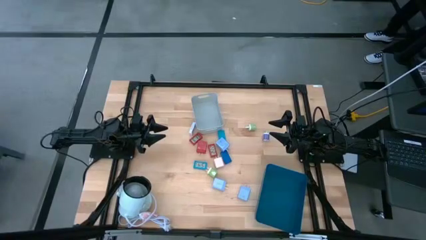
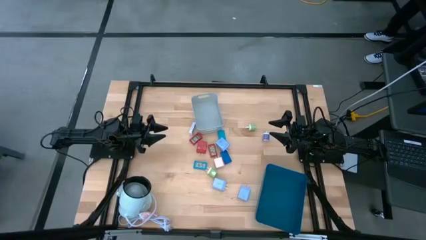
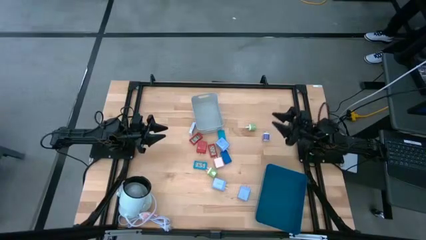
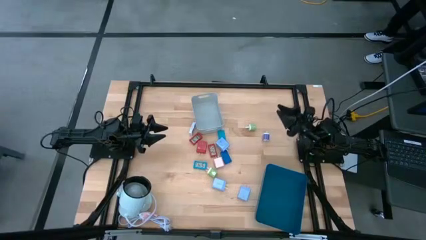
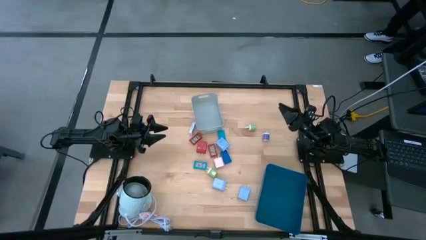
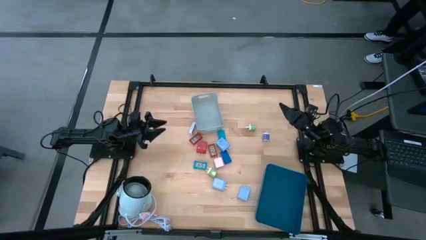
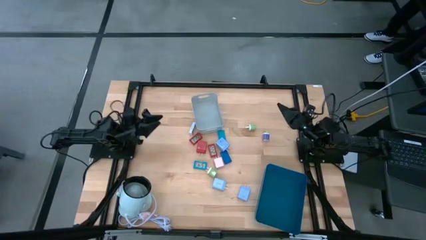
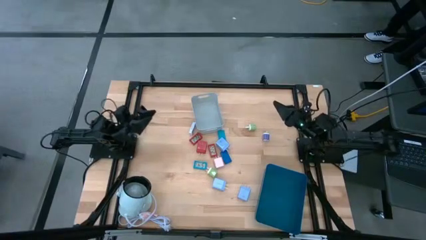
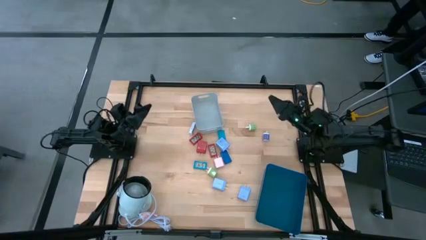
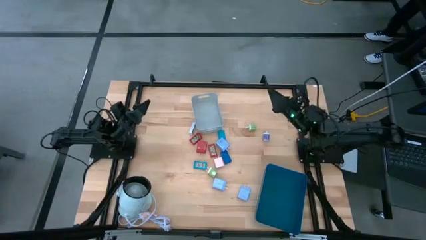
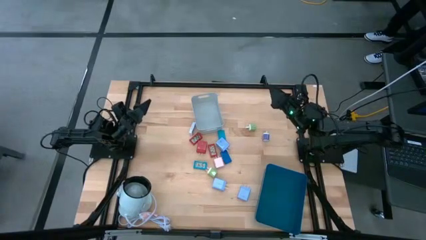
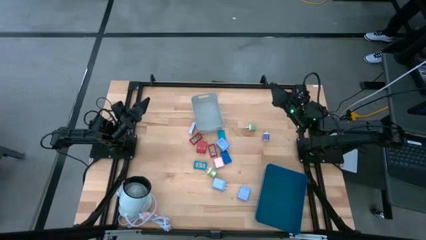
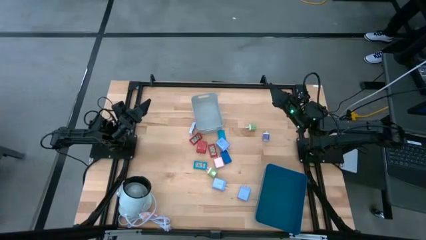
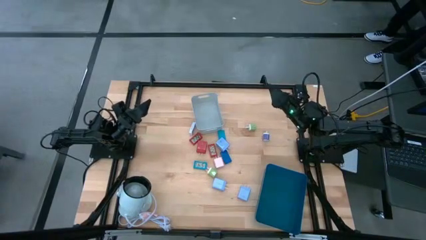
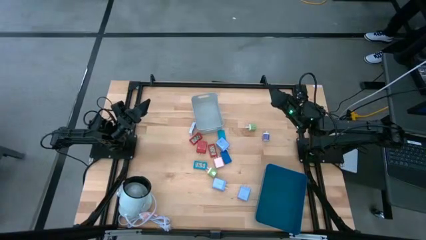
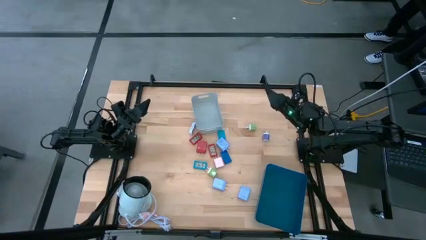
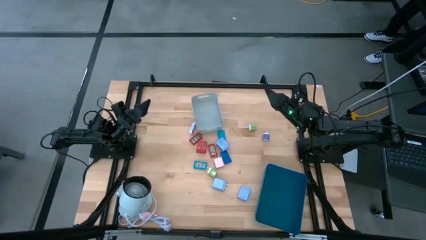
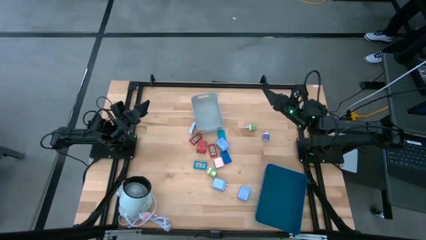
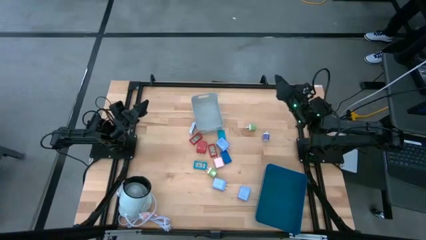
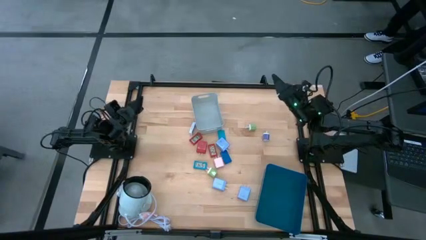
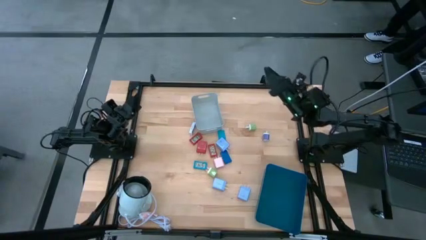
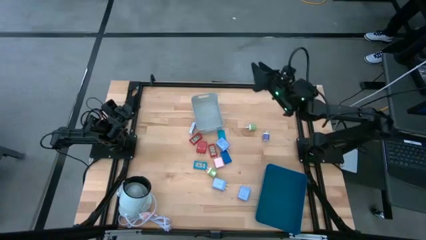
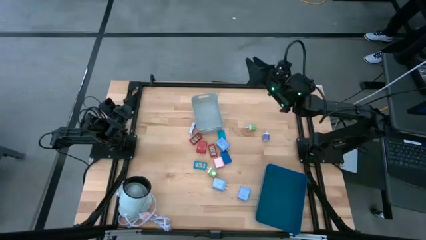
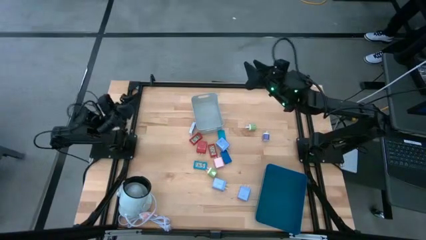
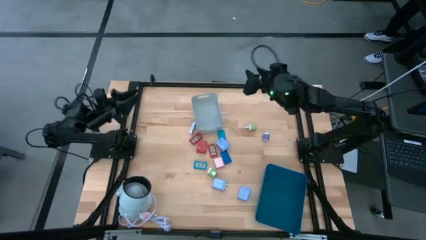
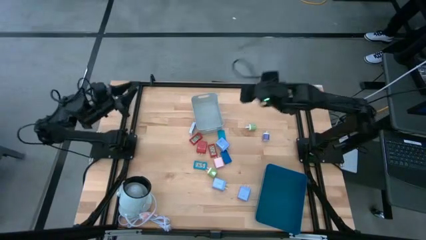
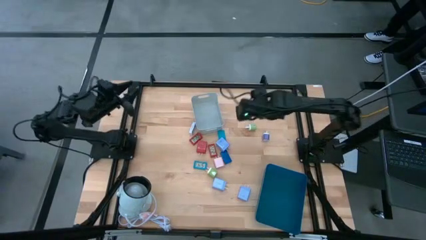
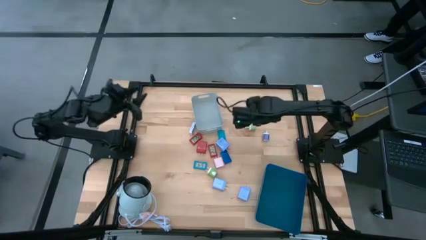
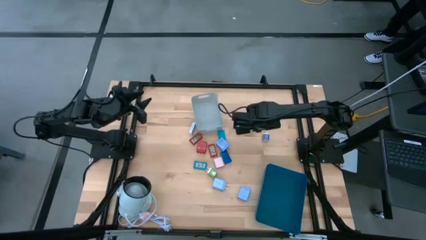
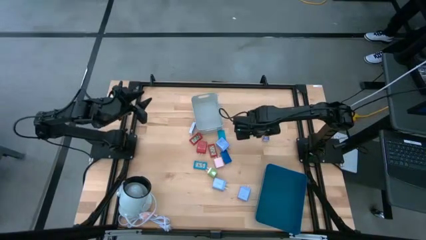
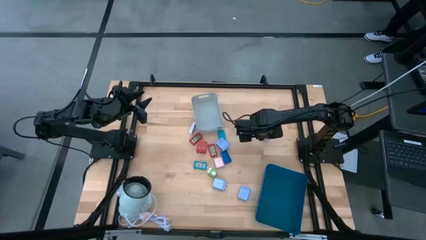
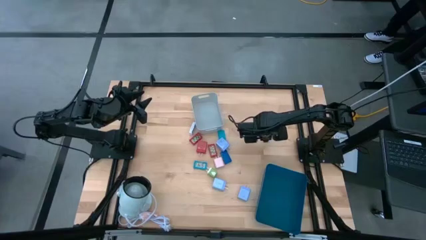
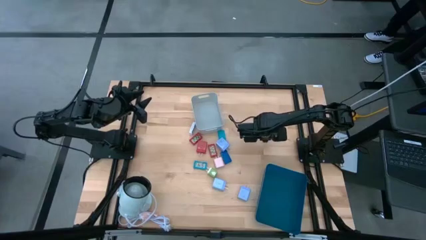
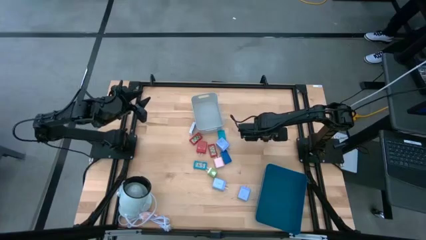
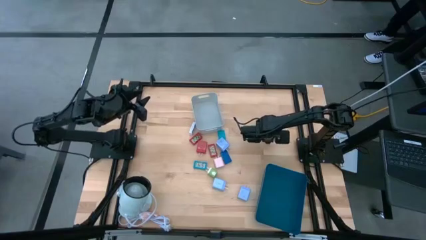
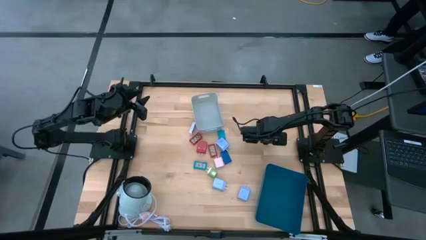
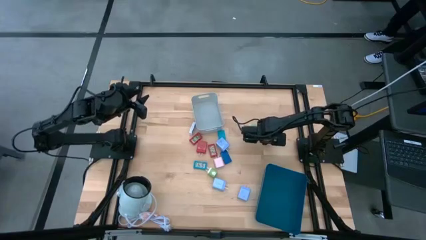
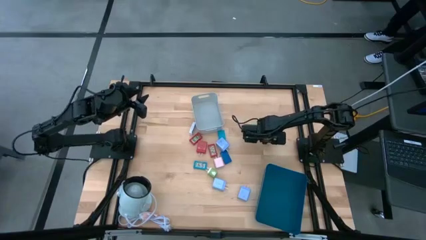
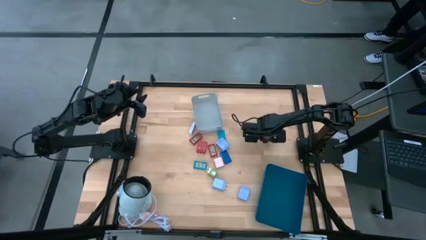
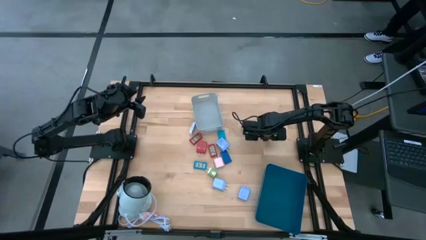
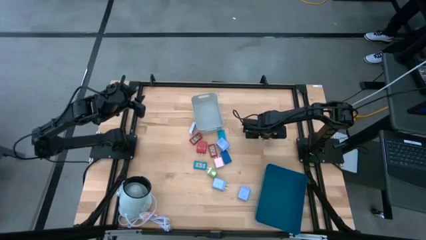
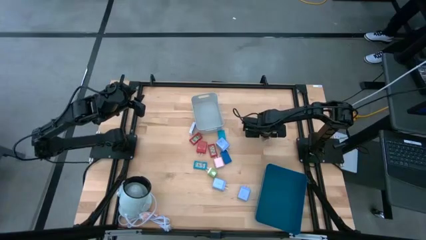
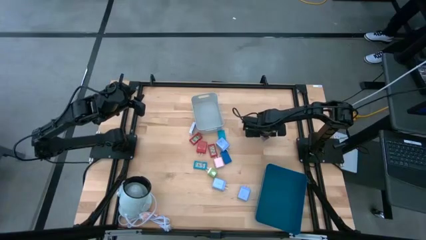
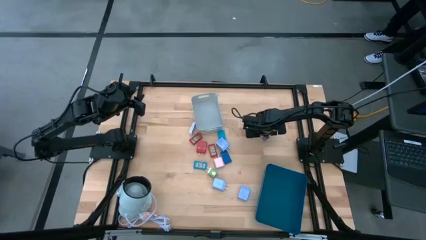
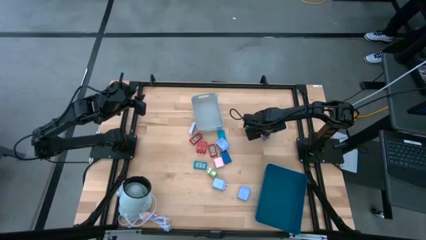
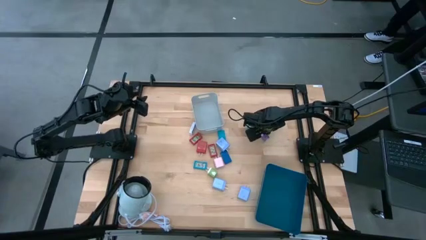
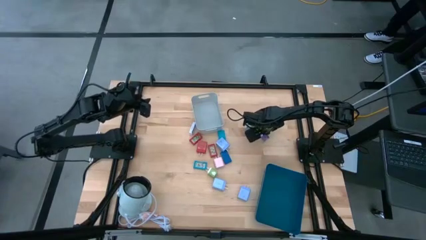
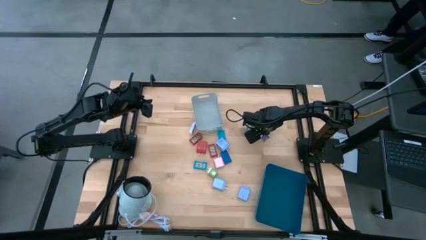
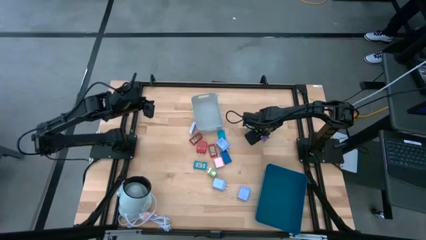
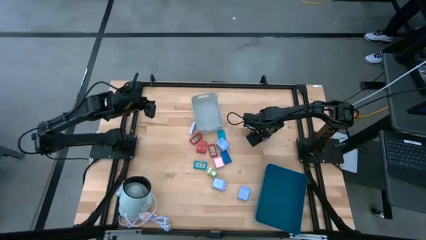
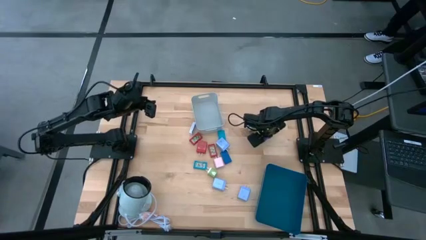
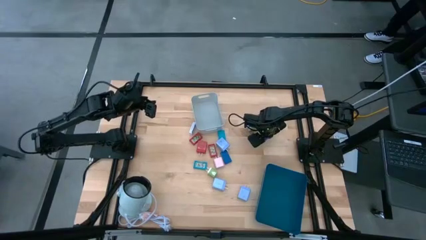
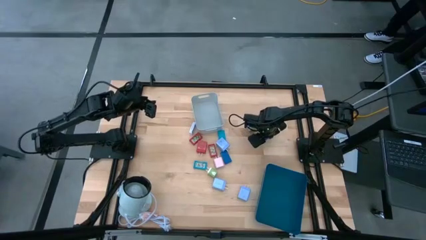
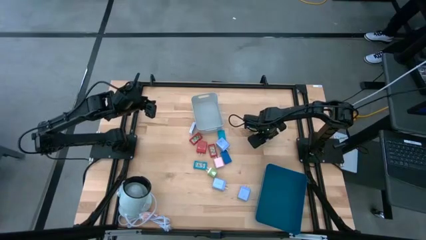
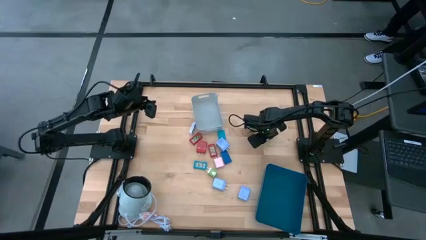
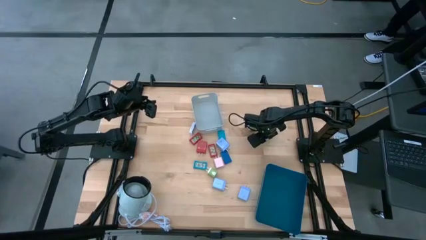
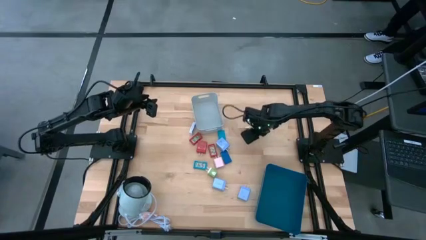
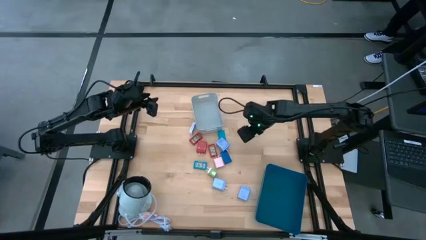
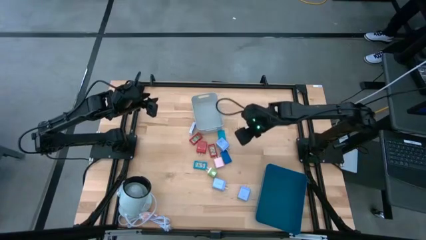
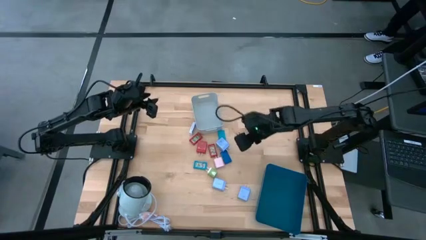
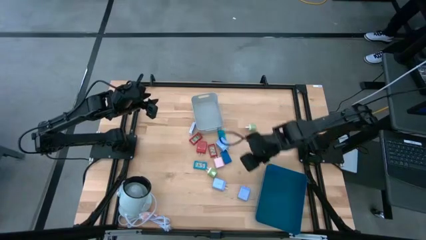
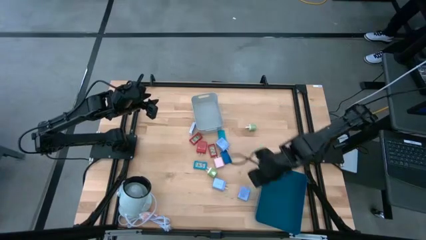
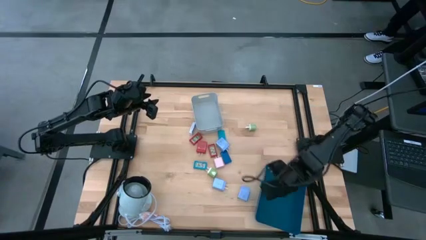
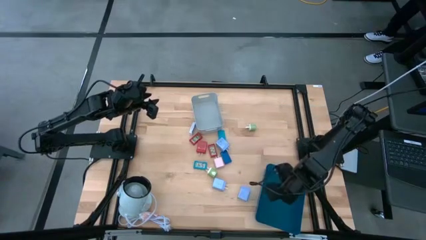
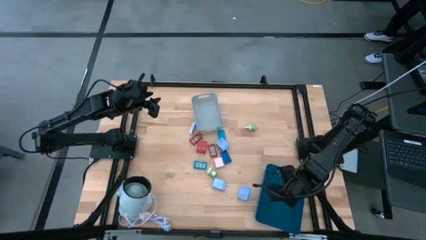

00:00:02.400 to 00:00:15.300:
Task: Pick & Place Office items
Put the violet charger adapter into the blue bin

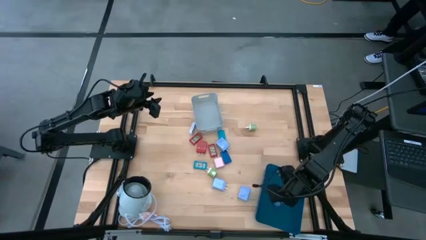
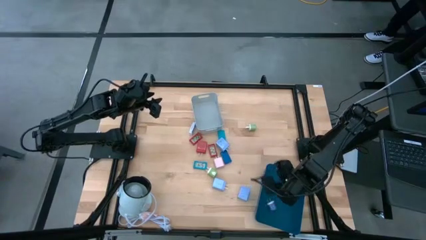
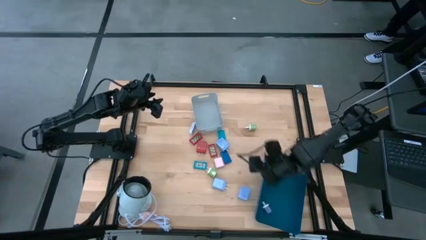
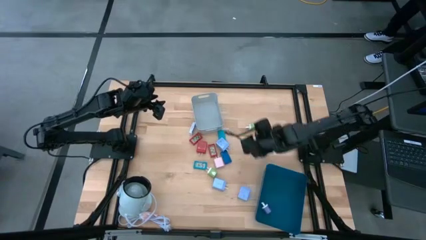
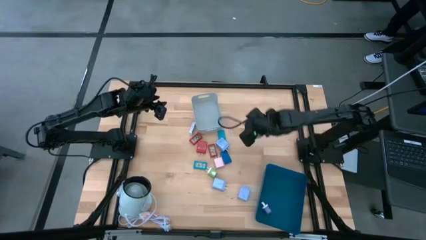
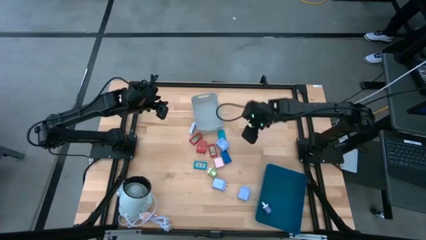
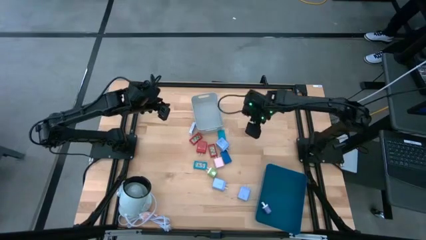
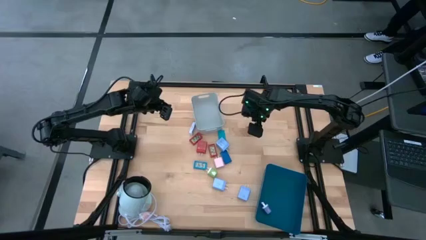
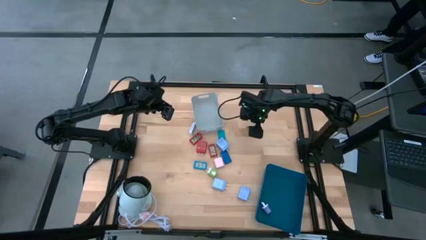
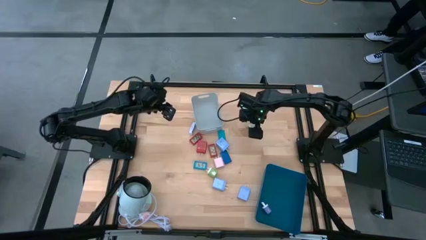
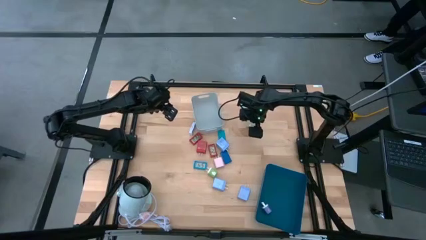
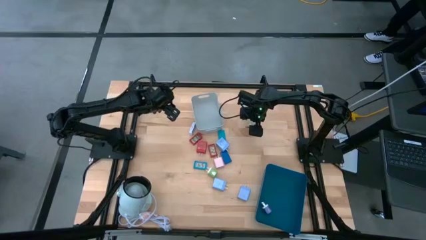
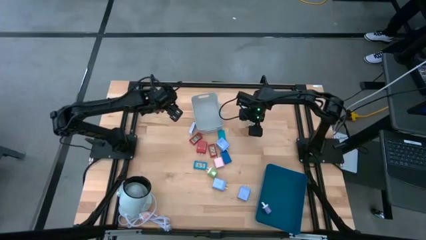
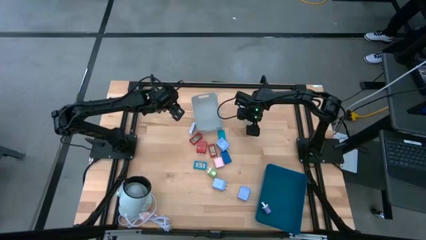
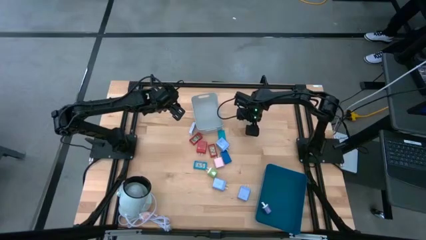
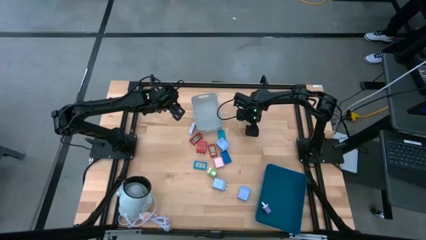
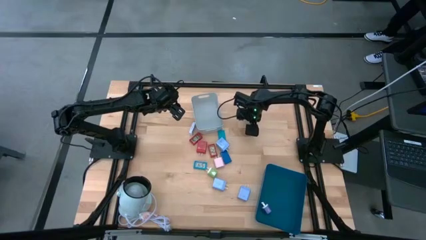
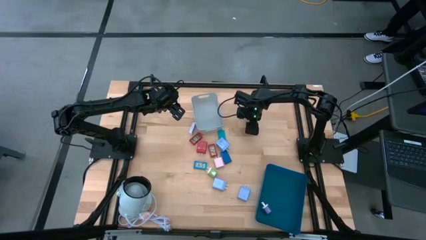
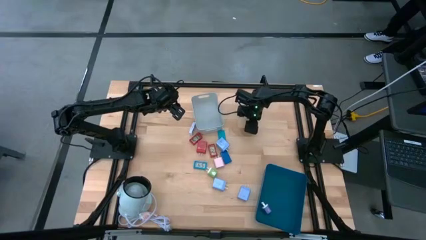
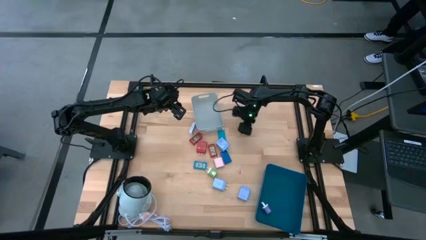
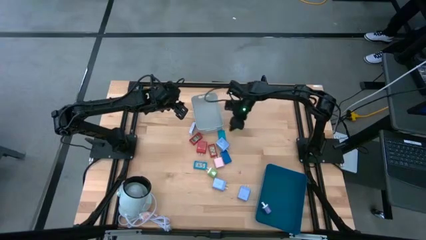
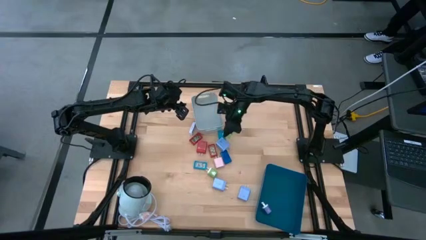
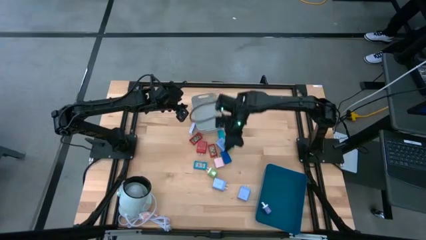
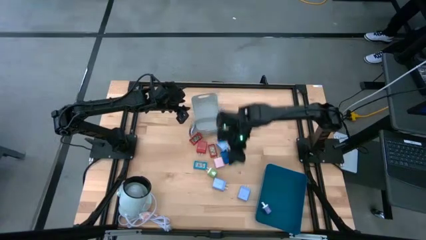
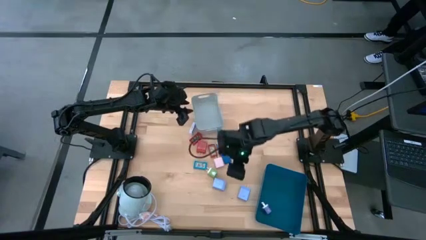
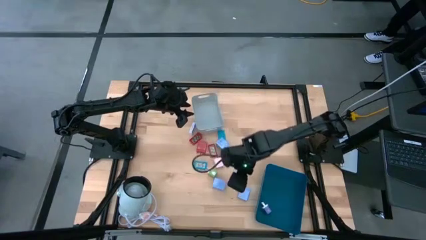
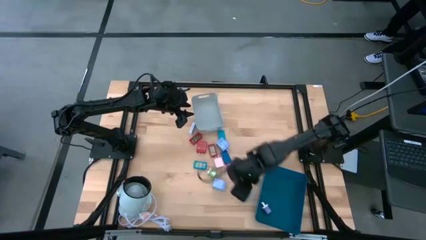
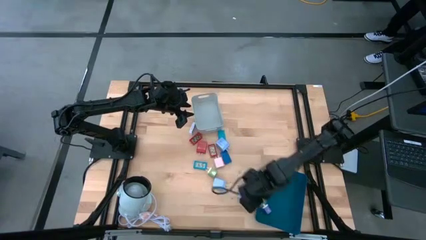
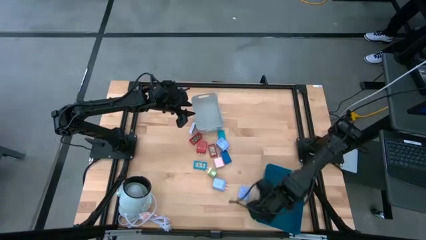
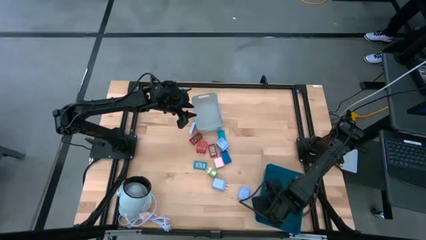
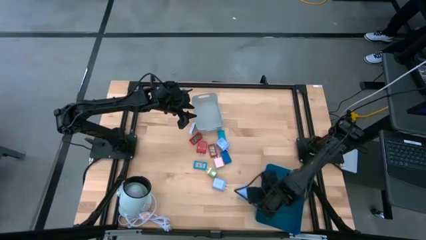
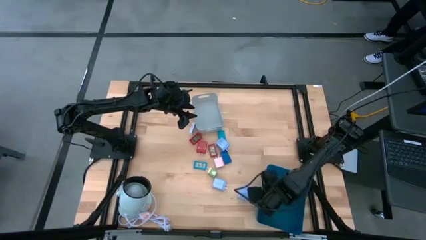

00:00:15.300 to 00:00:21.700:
Put the top green charger adapter into the blue bin
